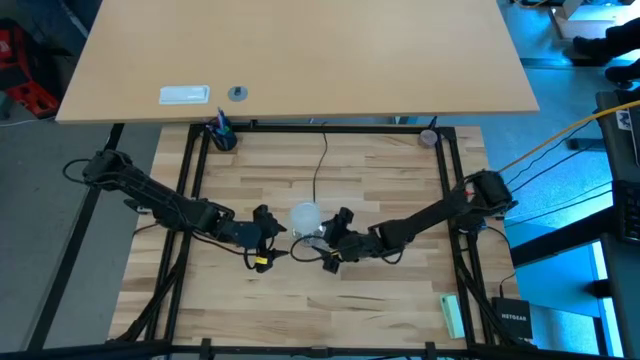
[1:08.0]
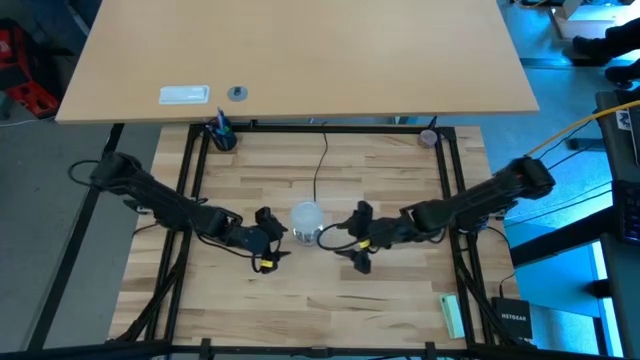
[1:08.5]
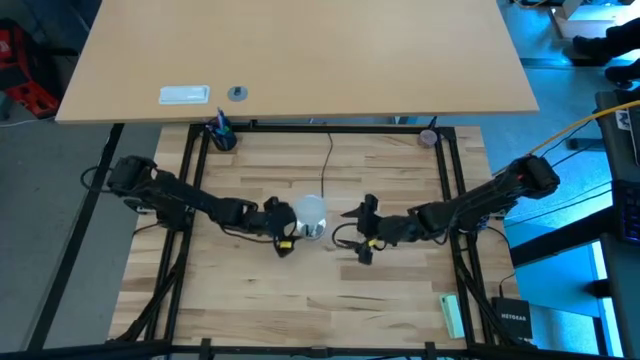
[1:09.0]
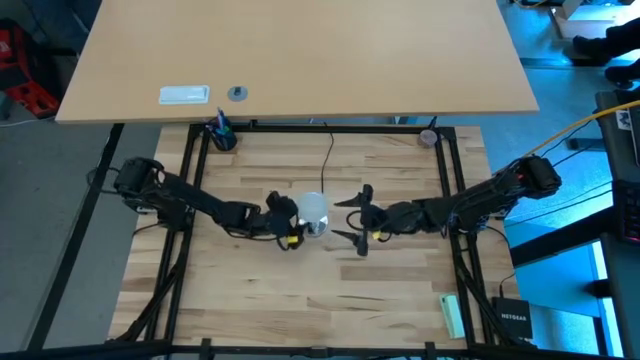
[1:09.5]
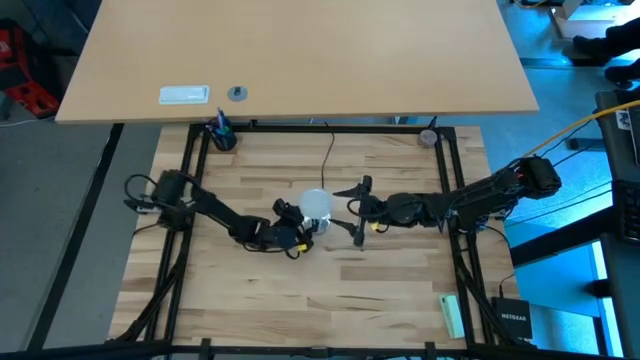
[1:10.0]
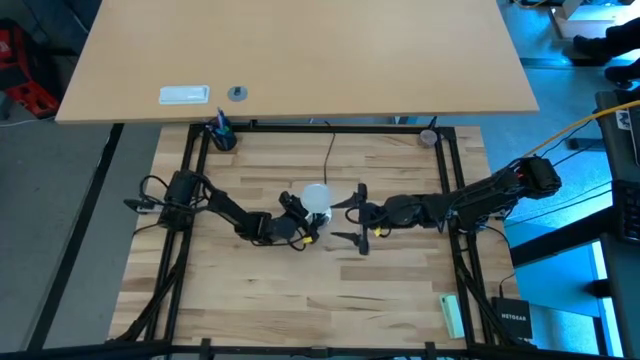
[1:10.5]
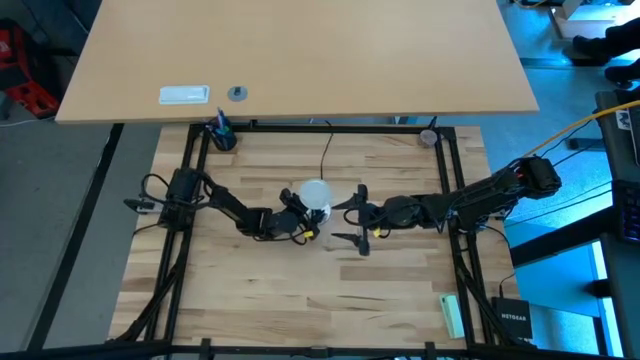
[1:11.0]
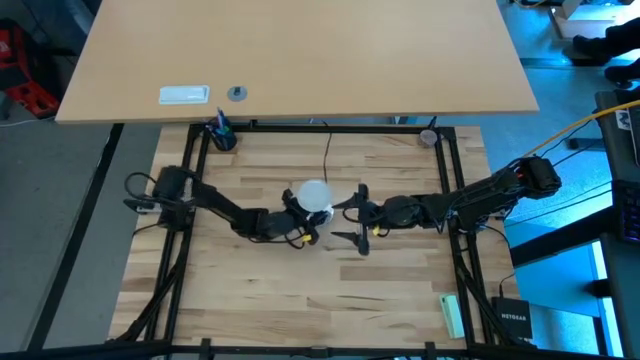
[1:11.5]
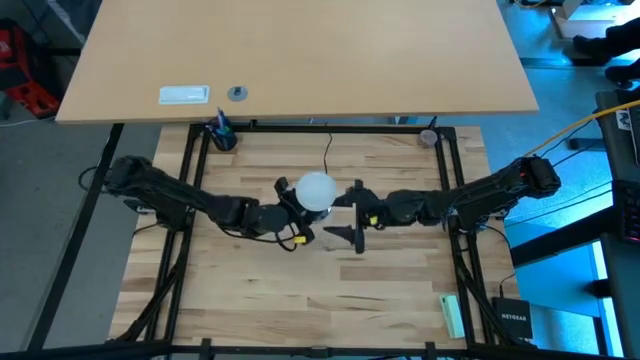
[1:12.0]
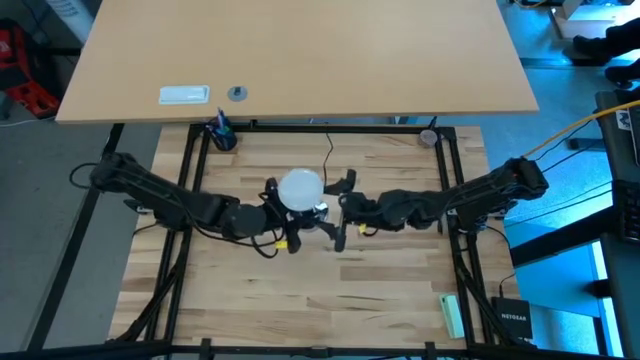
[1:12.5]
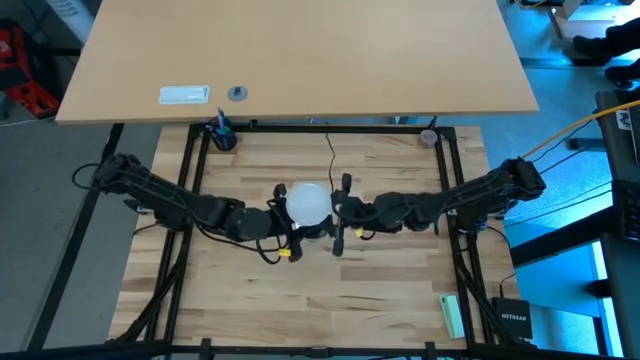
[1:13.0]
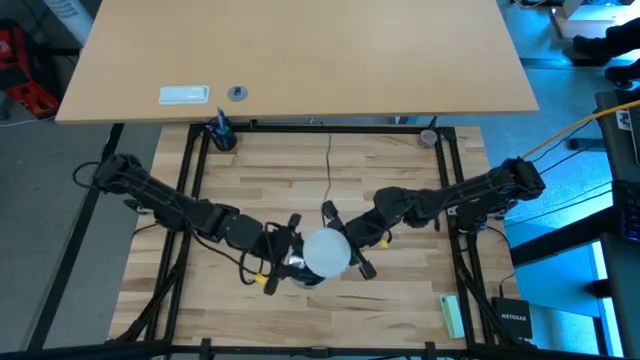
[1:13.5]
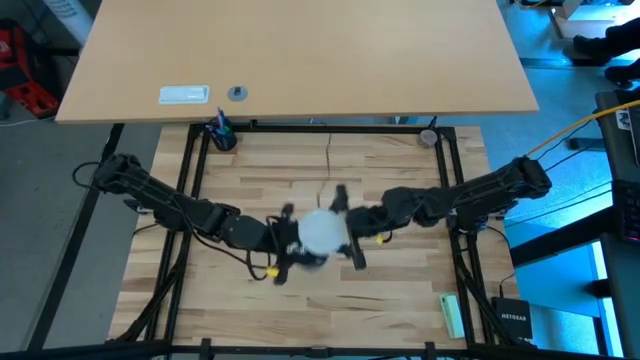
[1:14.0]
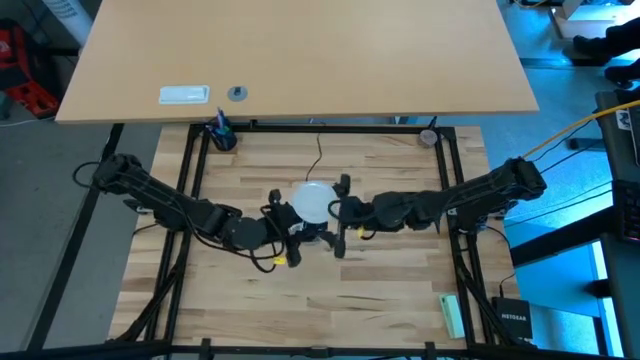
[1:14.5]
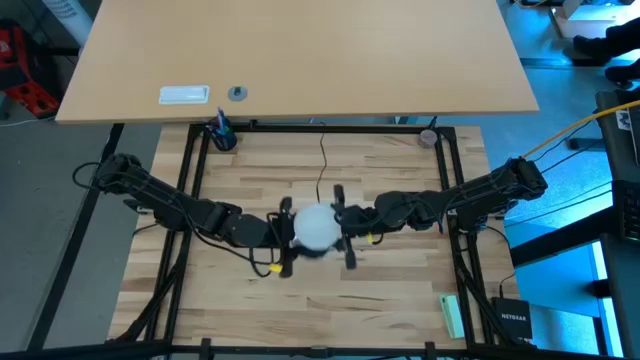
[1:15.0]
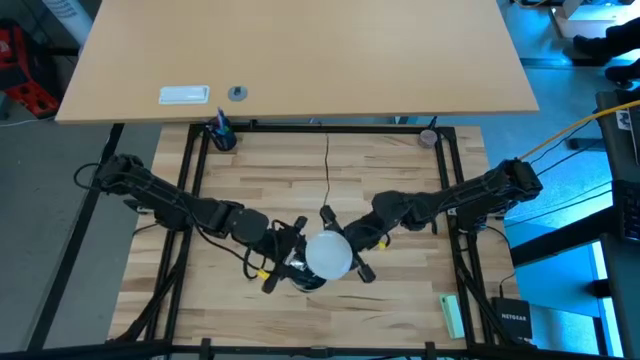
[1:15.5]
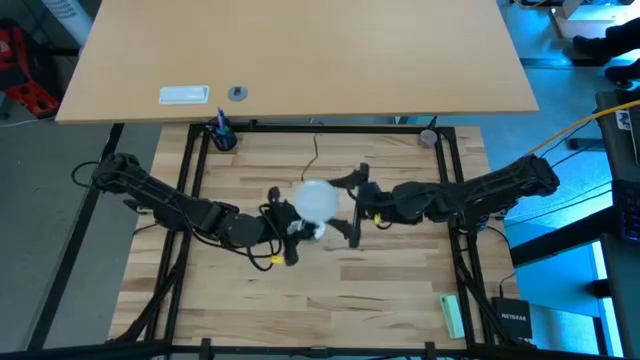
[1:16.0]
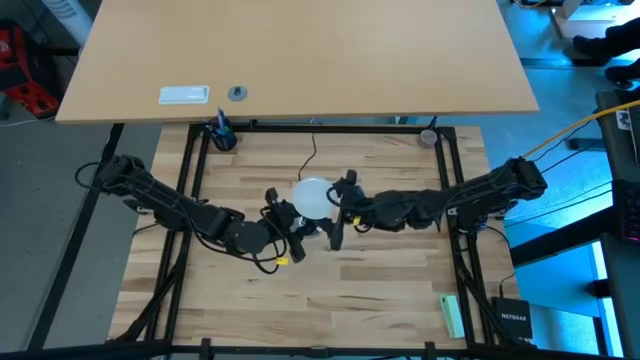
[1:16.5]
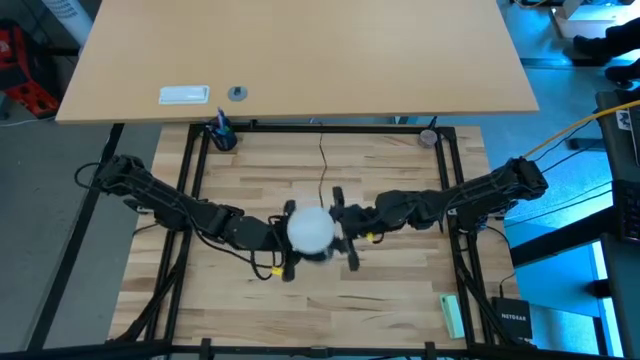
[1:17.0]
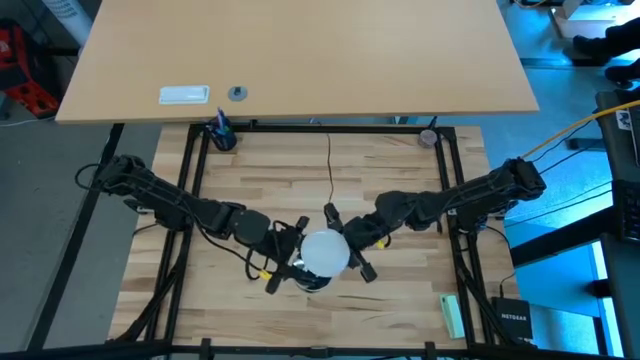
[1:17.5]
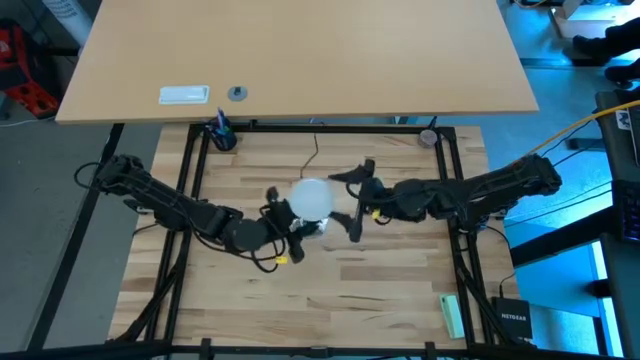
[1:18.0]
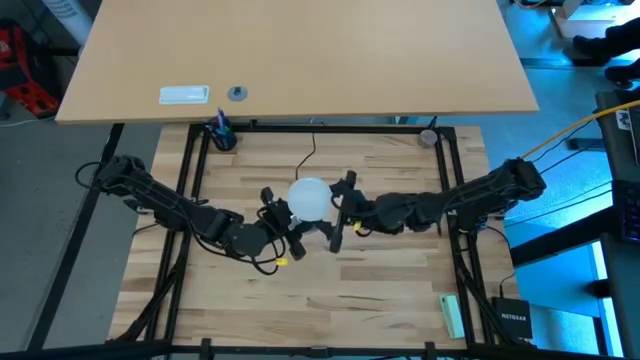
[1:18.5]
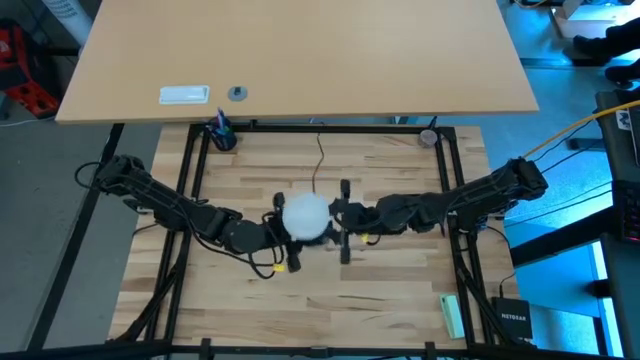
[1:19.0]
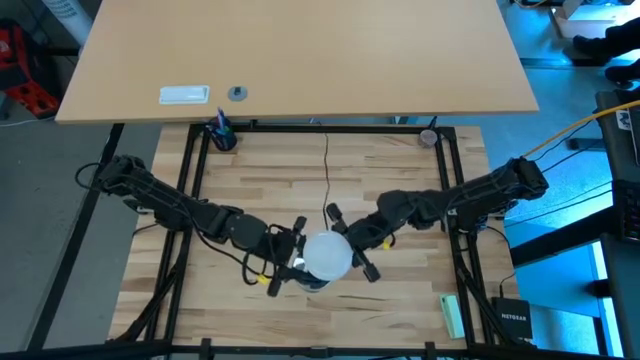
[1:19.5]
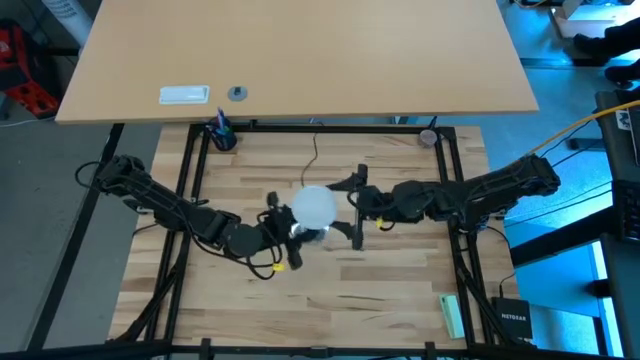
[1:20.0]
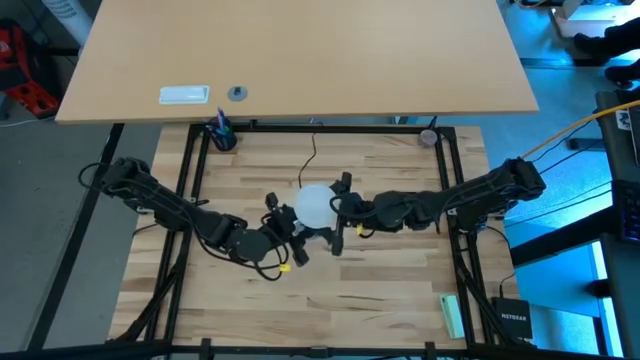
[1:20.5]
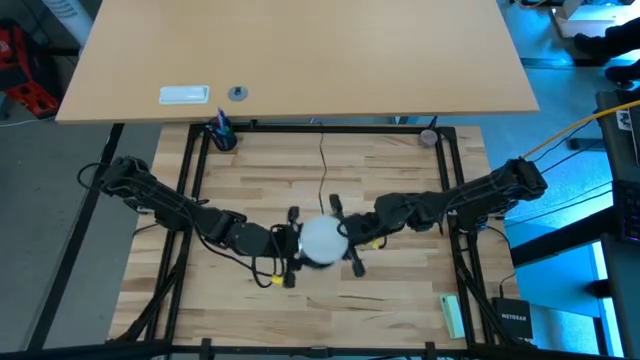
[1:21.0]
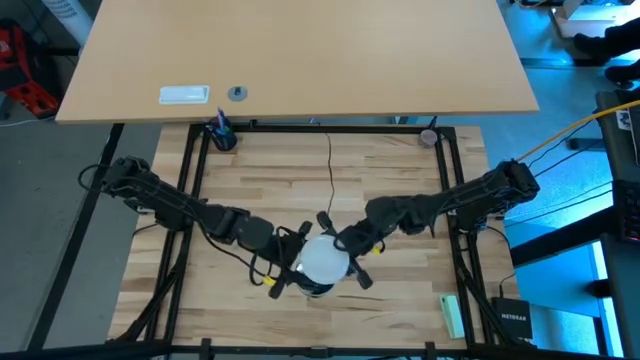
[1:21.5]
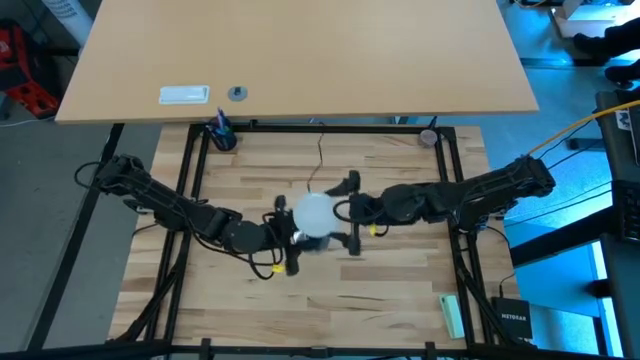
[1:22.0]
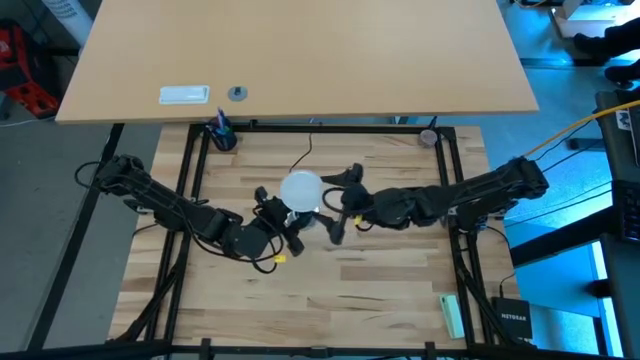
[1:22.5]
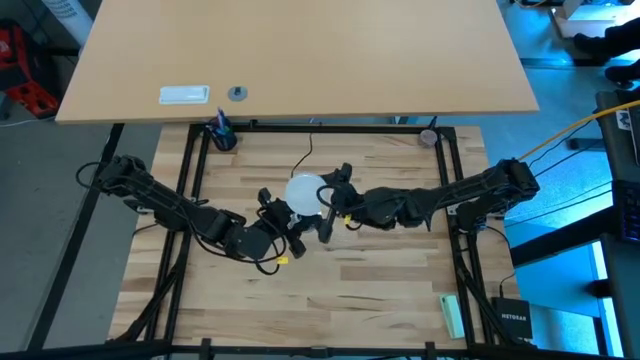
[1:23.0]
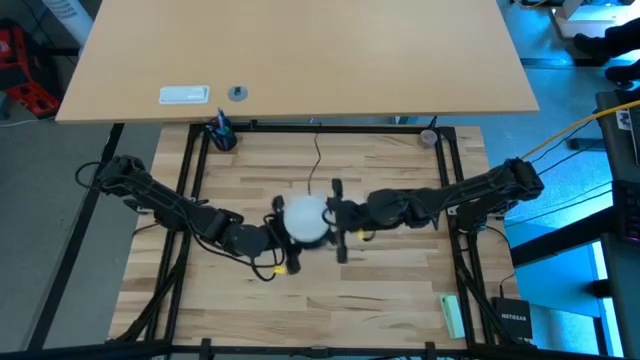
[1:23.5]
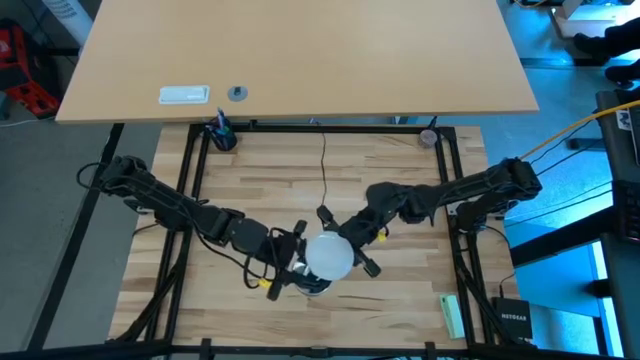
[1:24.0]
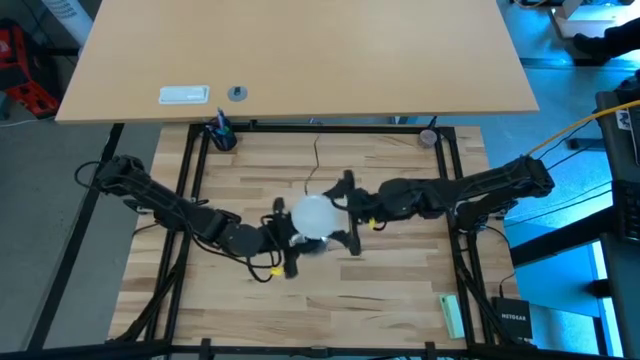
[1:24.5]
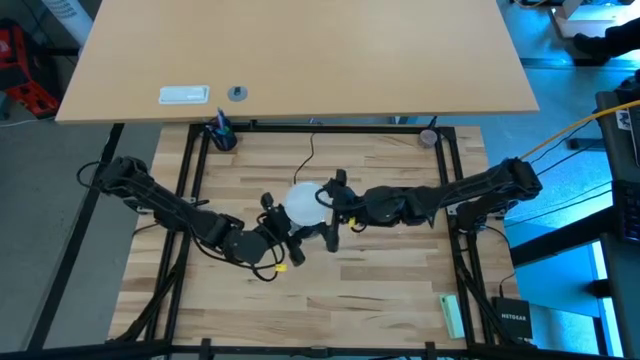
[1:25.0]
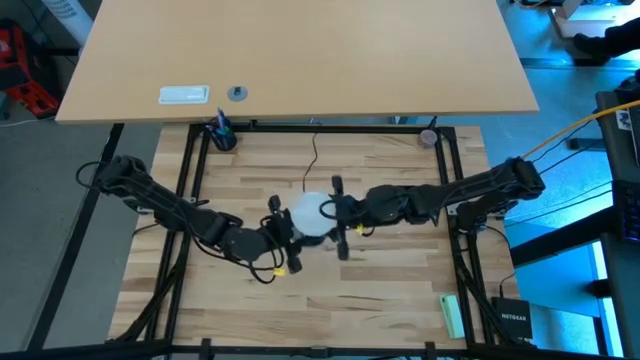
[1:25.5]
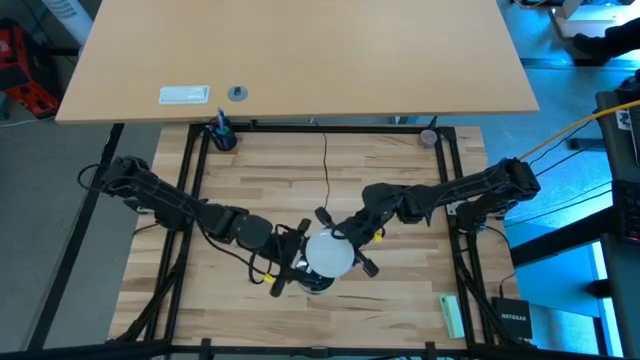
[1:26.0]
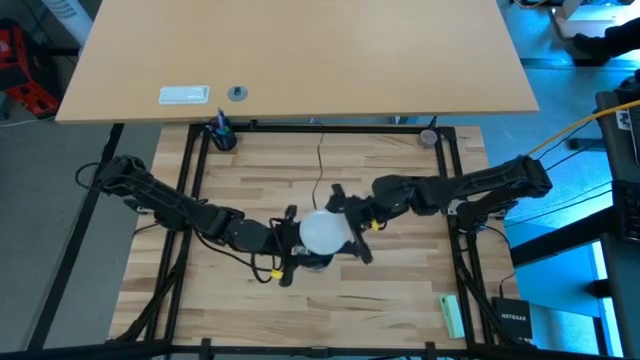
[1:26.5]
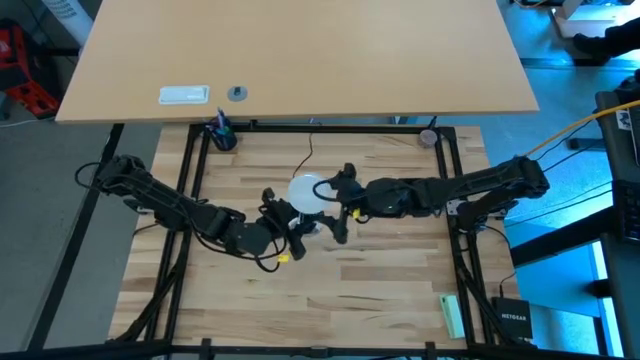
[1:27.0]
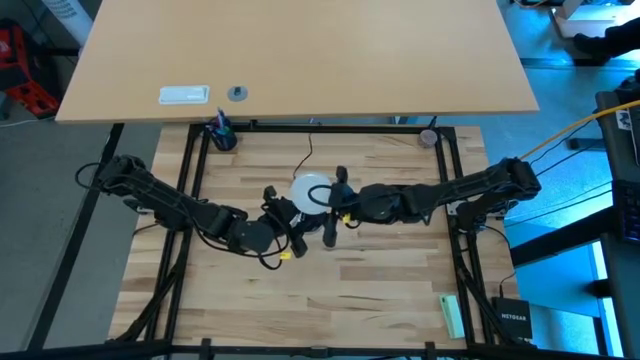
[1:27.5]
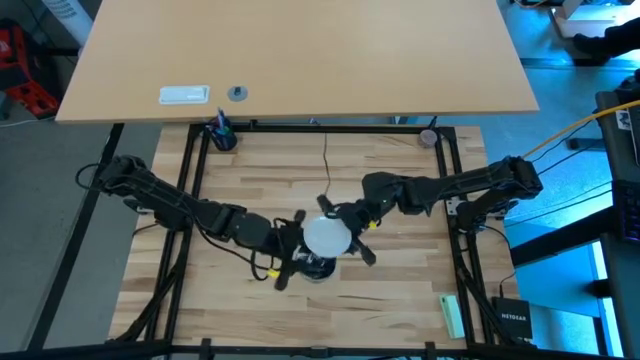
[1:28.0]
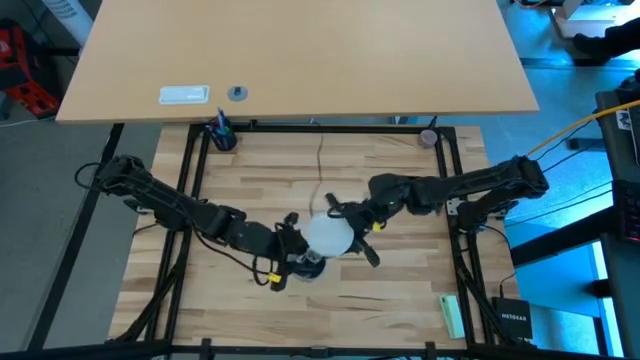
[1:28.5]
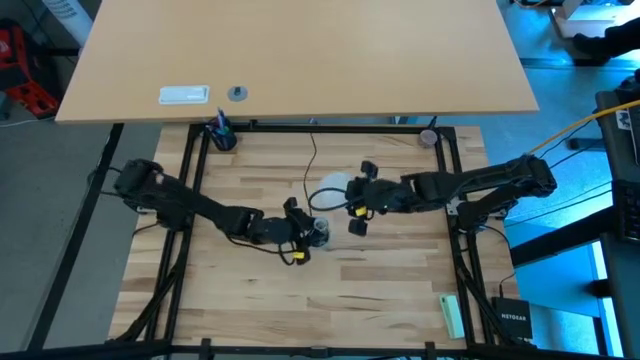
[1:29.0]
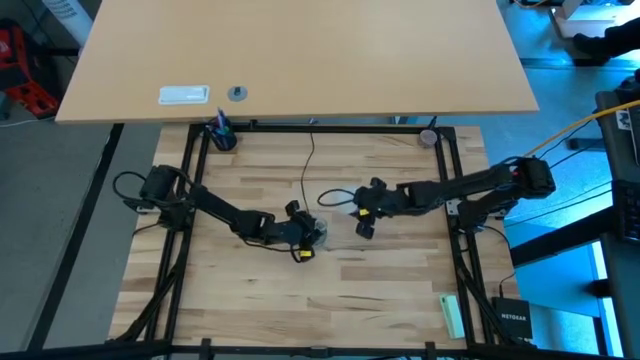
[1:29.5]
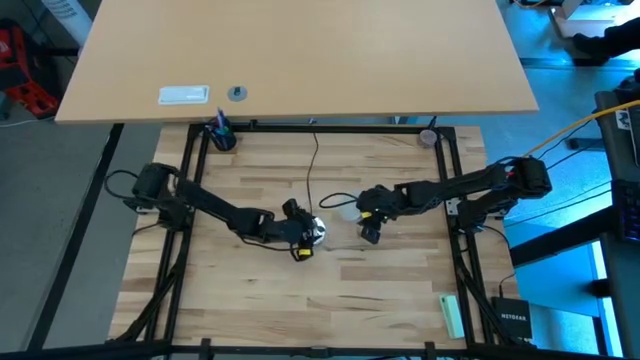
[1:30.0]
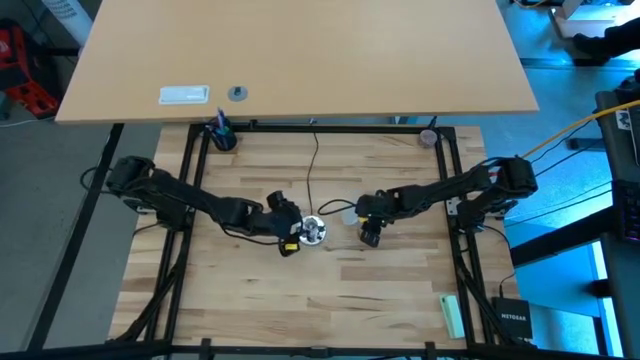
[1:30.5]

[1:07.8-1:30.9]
Task: Screw lightbulb
Remove the lightbulb from the lamp
